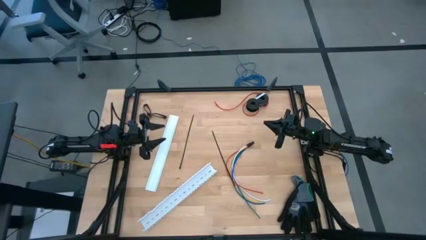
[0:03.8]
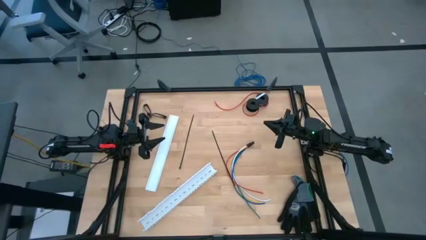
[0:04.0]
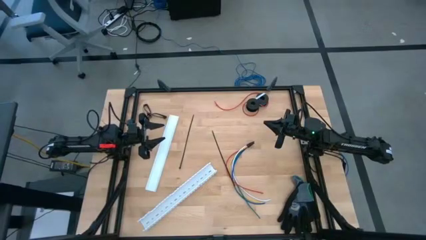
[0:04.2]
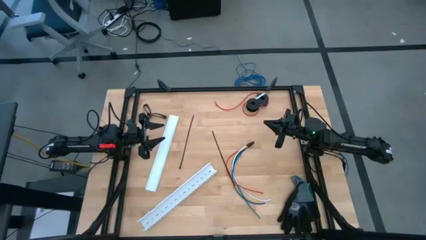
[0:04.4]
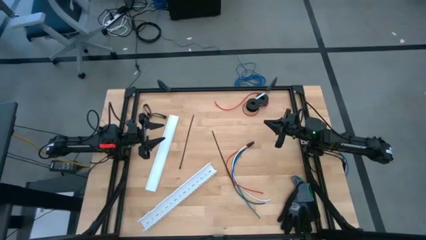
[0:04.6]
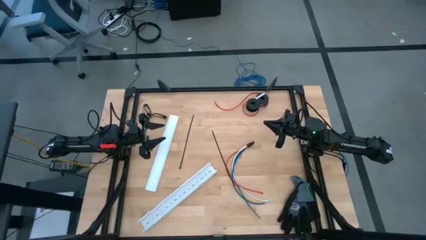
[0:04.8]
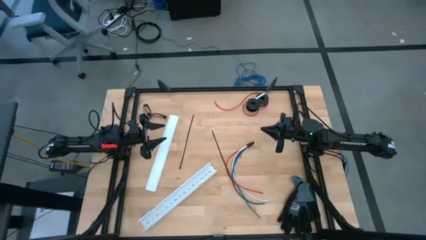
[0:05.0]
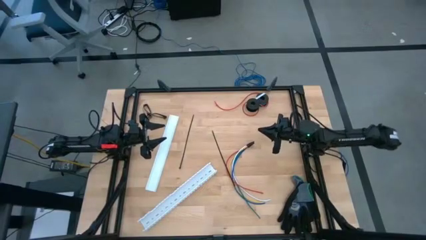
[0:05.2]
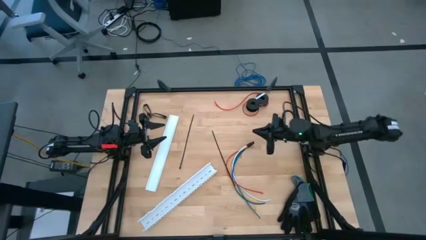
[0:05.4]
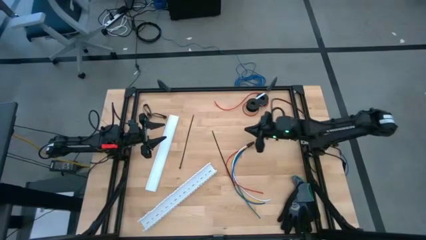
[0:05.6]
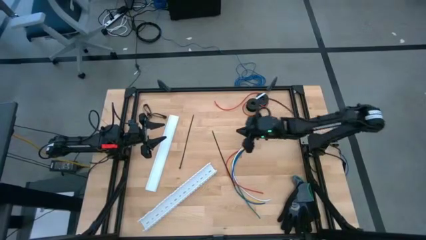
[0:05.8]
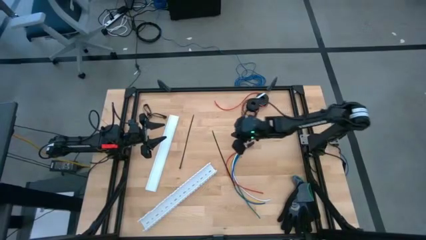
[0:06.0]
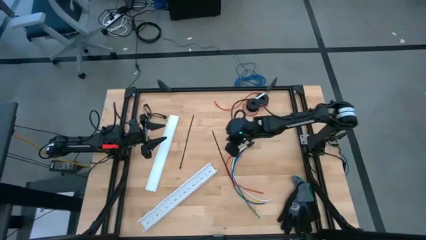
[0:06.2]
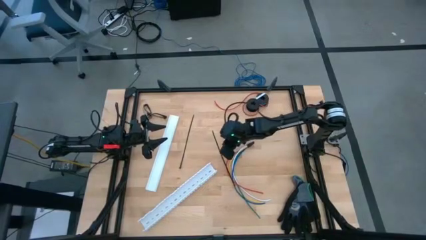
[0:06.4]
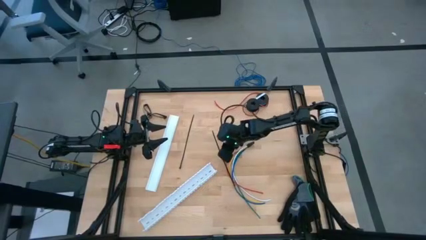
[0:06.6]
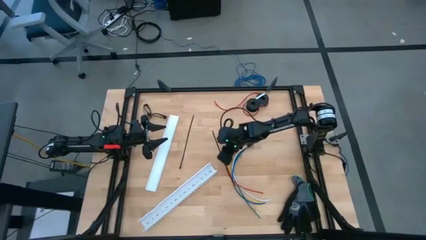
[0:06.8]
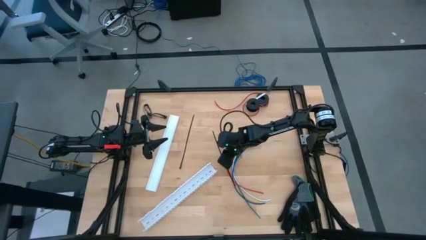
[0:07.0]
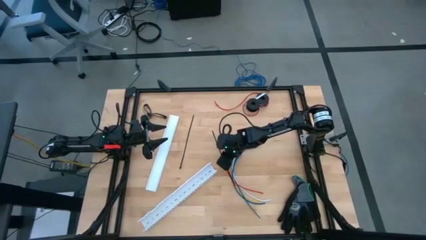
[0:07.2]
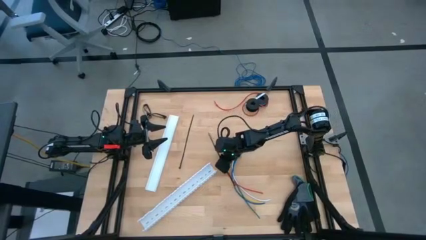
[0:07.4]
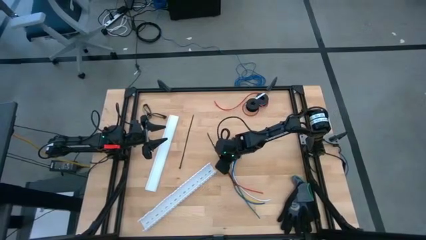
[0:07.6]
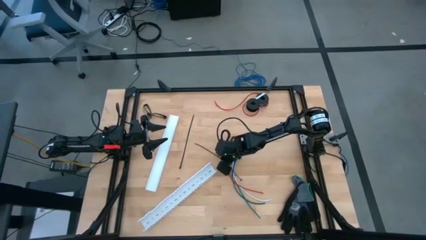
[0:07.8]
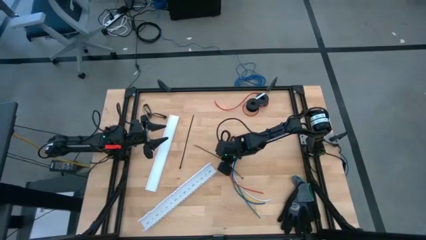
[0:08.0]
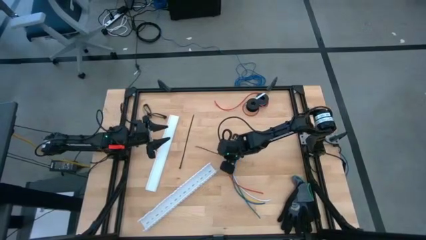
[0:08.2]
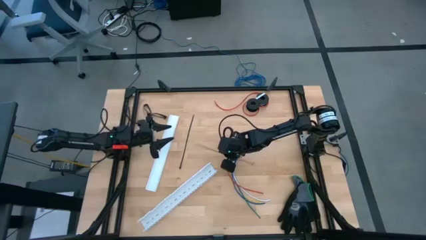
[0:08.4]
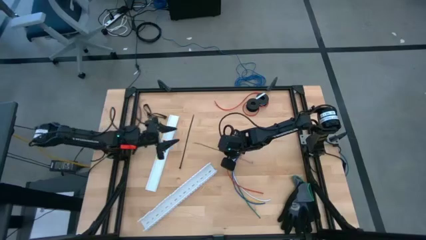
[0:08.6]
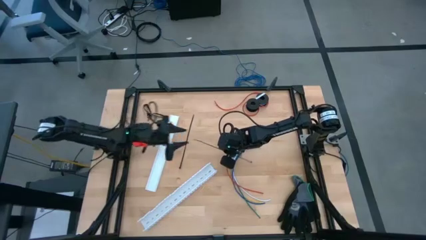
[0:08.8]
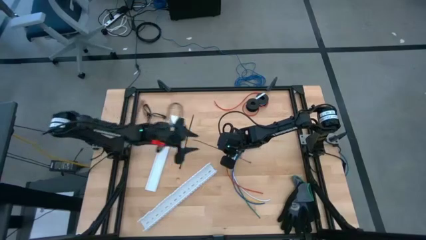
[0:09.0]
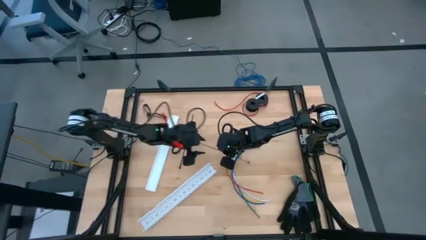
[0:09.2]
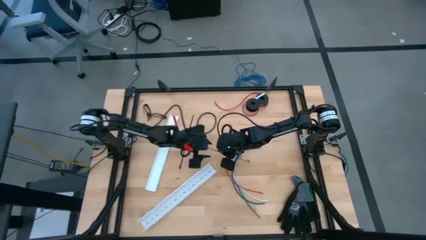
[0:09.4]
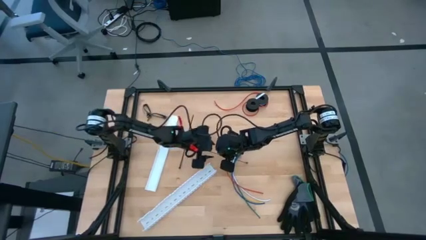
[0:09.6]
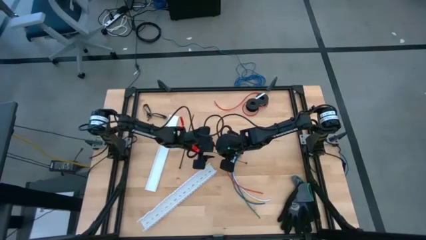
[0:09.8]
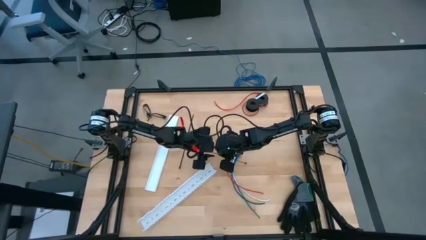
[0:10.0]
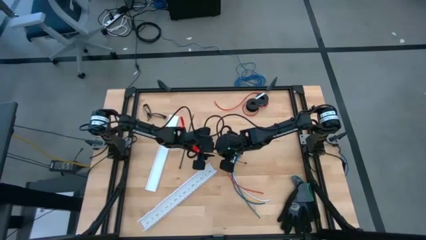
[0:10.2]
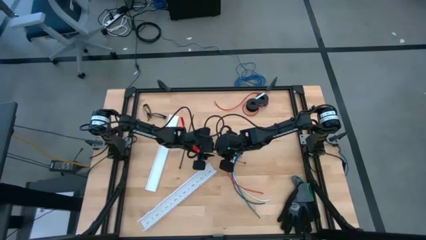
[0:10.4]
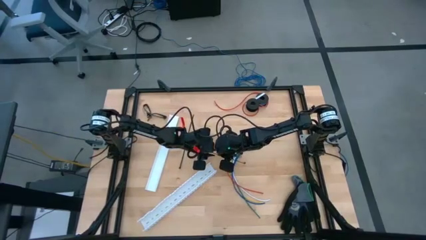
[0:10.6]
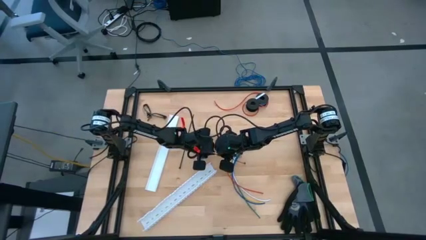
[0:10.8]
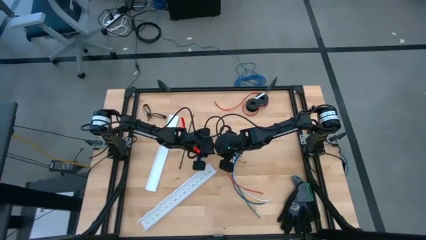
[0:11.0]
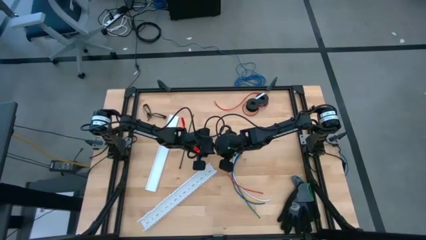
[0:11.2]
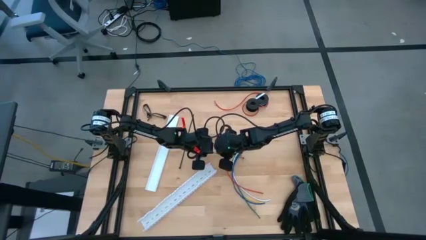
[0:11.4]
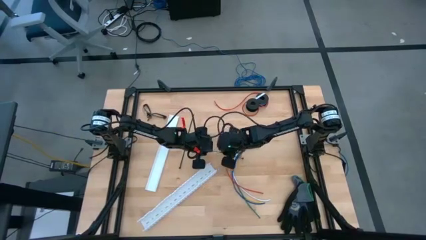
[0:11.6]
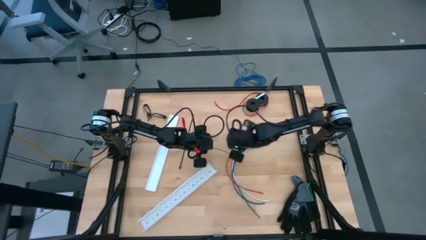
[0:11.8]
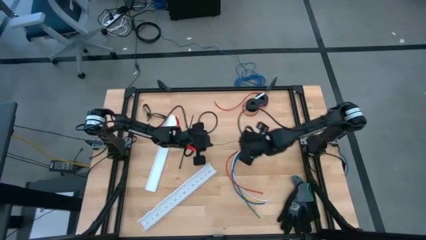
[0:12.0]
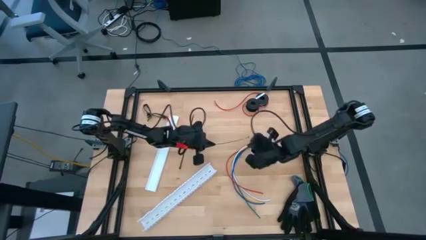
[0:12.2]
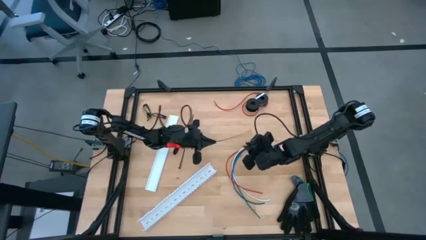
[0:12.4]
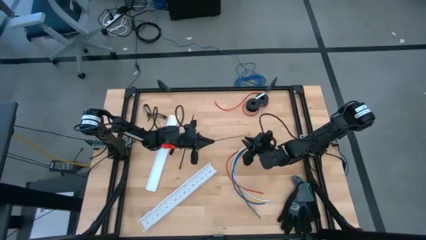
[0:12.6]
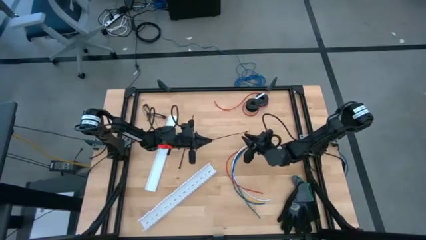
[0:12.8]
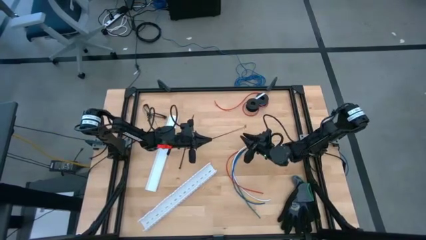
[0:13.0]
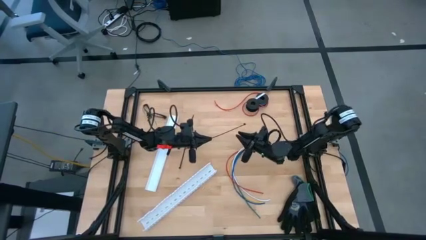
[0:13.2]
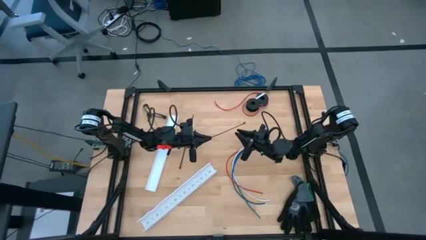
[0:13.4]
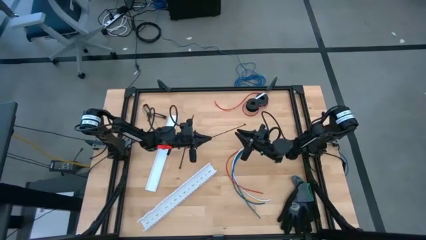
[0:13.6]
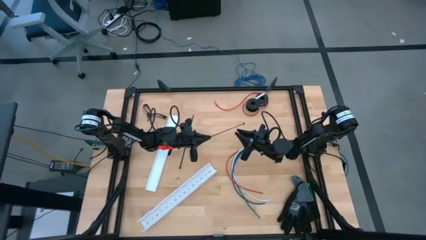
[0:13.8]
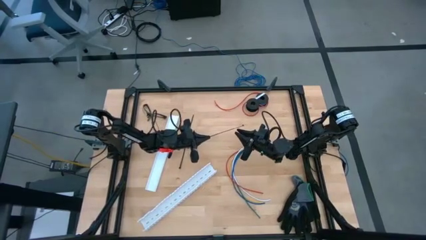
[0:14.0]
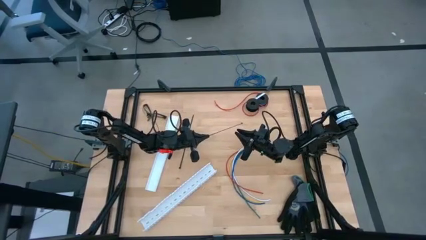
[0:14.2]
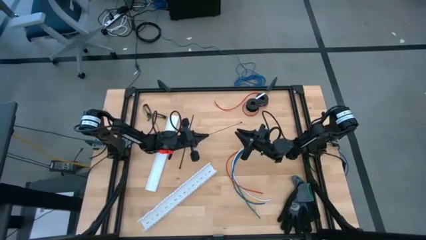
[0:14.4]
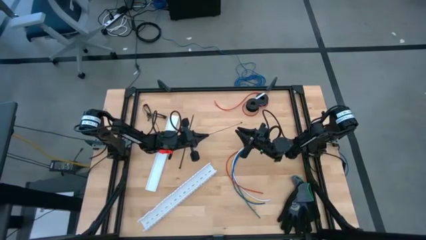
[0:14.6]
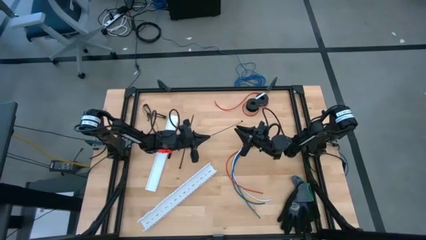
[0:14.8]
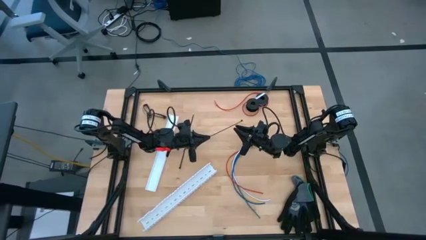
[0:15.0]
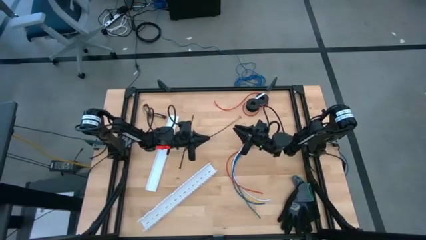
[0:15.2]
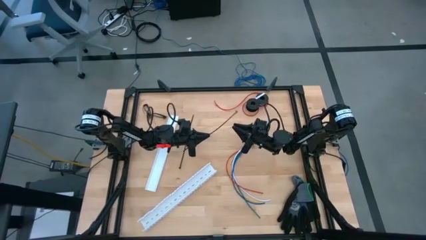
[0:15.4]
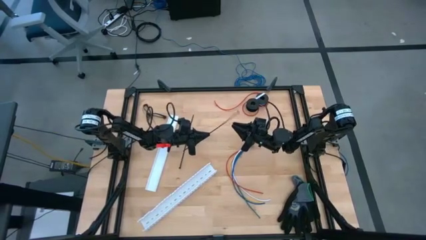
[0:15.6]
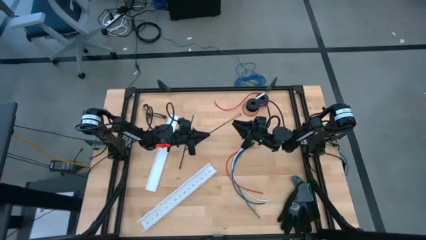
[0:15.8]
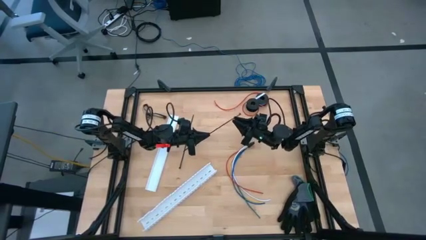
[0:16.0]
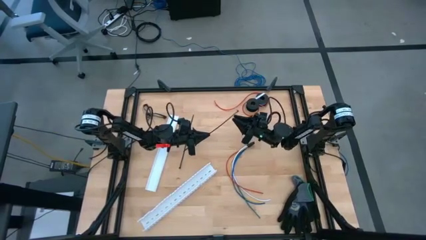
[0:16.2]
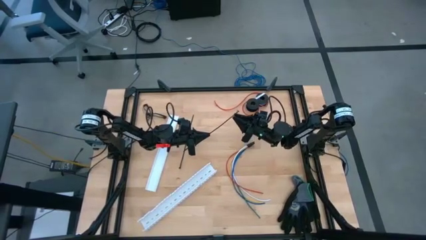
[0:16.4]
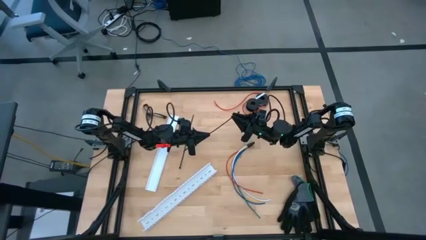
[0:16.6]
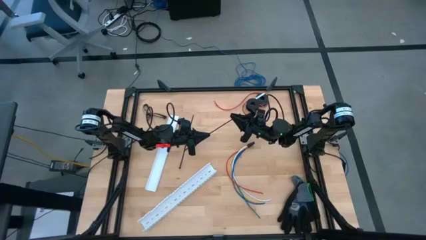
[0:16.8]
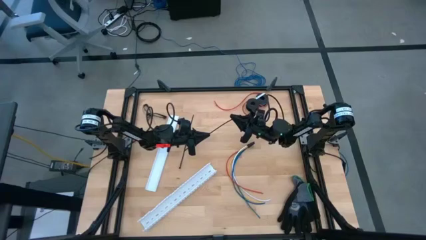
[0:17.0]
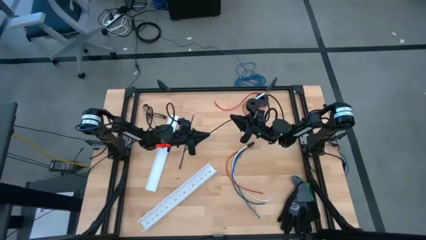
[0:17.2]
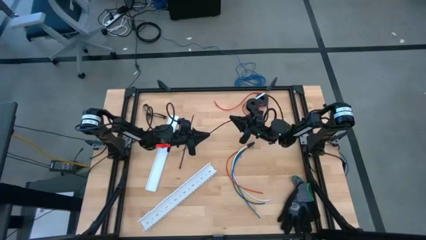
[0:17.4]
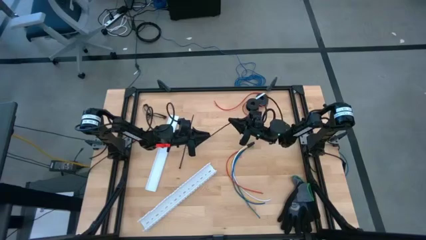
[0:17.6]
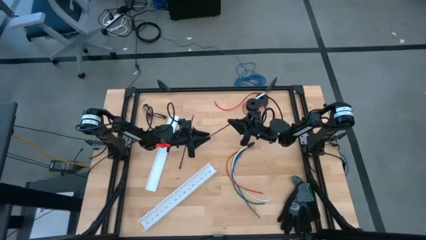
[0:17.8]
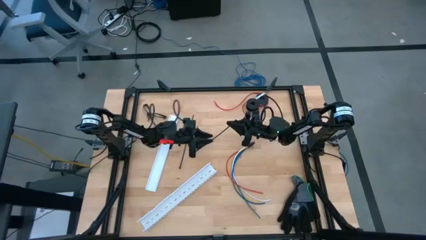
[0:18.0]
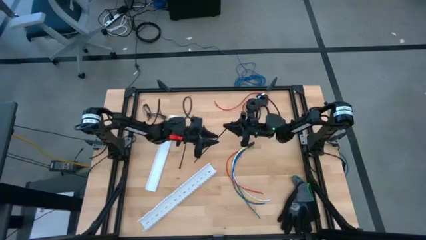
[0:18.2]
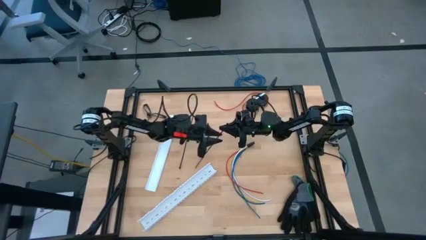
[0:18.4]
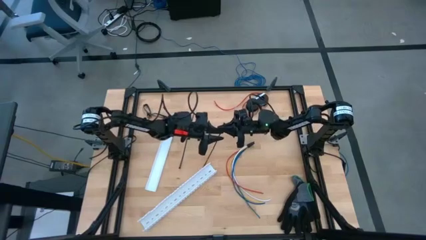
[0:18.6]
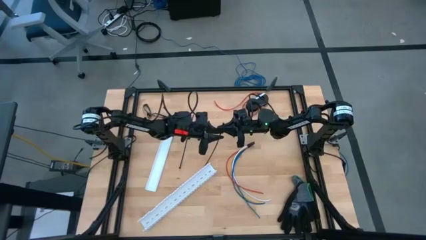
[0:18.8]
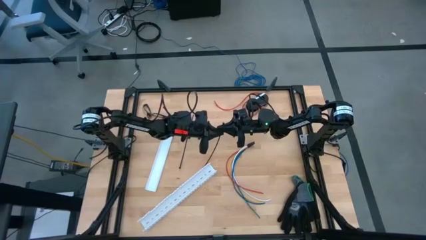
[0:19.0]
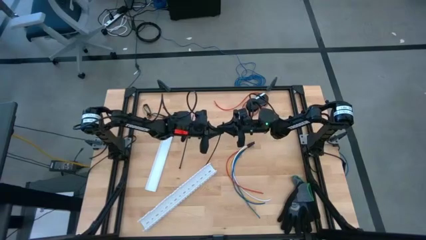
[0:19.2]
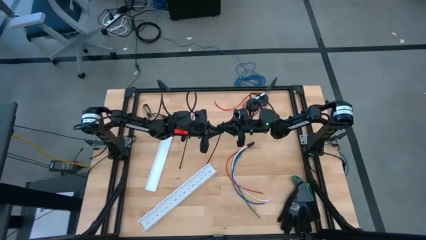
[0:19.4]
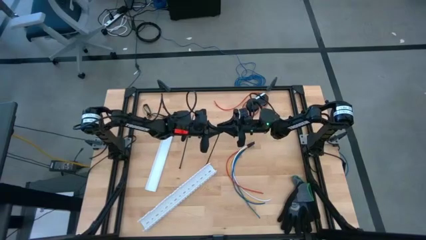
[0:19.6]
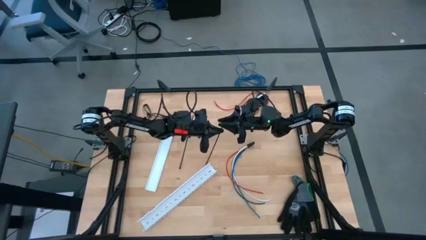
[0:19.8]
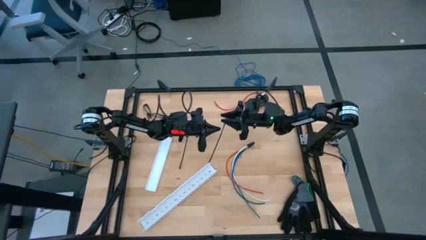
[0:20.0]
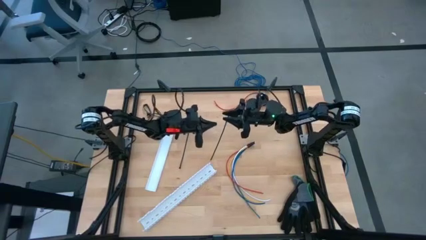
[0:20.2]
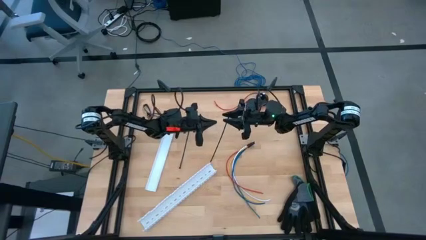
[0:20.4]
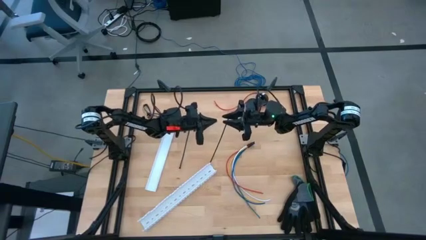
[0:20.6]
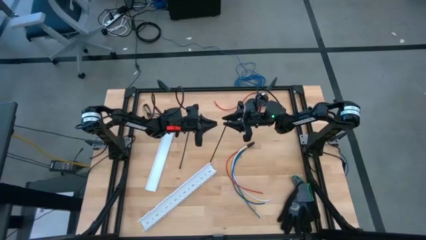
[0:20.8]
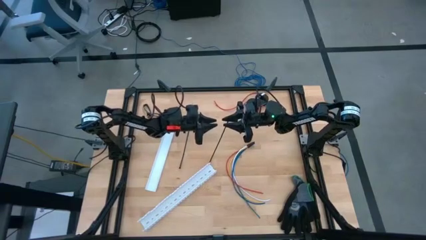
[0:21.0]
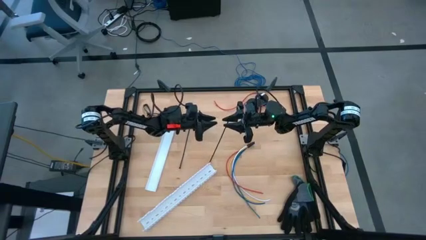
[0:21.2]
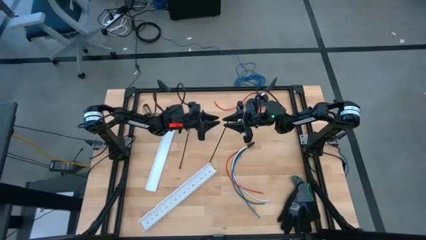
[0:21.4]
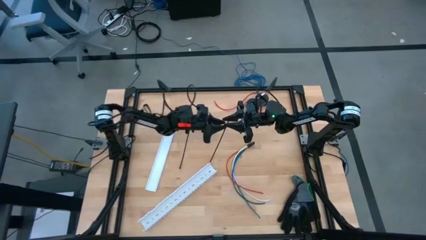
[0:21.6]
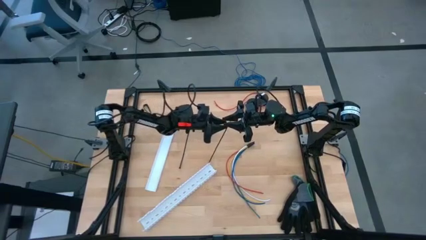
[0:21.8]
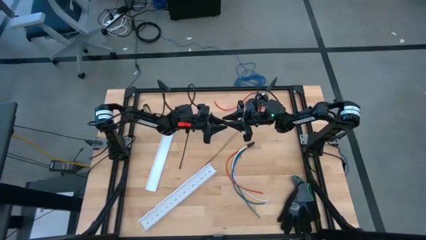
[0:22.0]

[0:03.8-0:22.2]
Task: Ziptie cables
Wrap the right black zip tie
